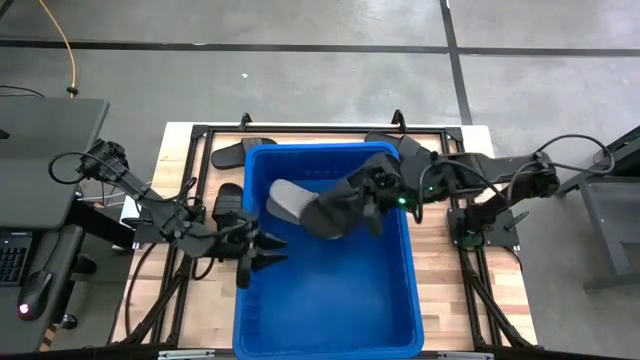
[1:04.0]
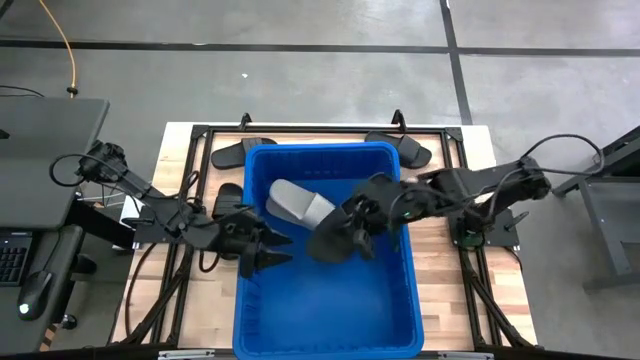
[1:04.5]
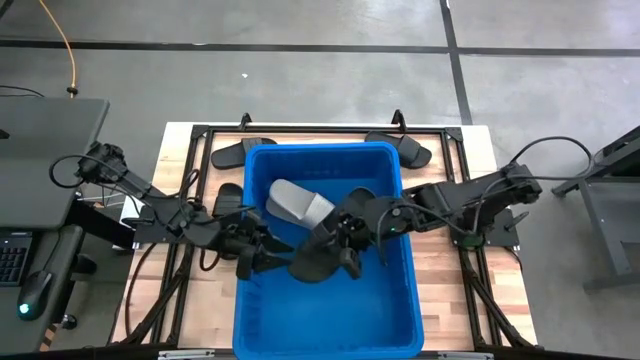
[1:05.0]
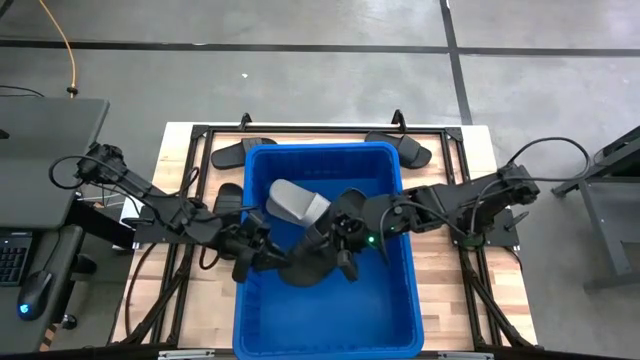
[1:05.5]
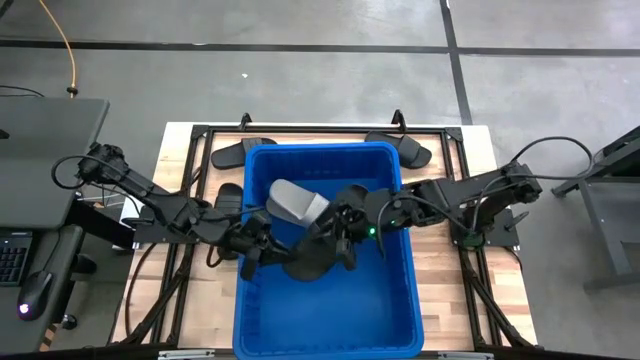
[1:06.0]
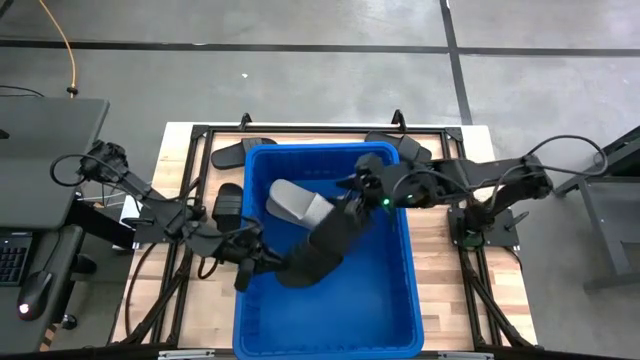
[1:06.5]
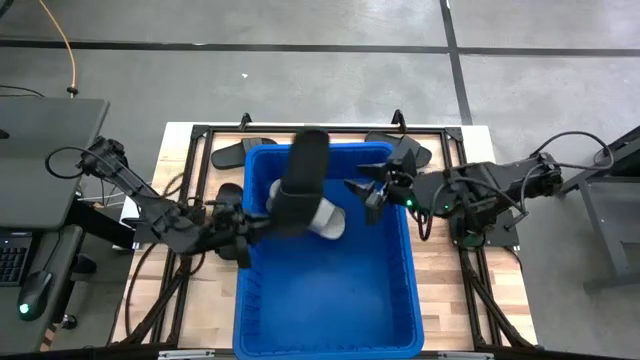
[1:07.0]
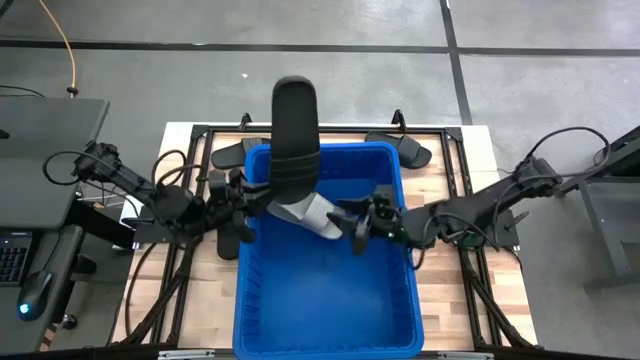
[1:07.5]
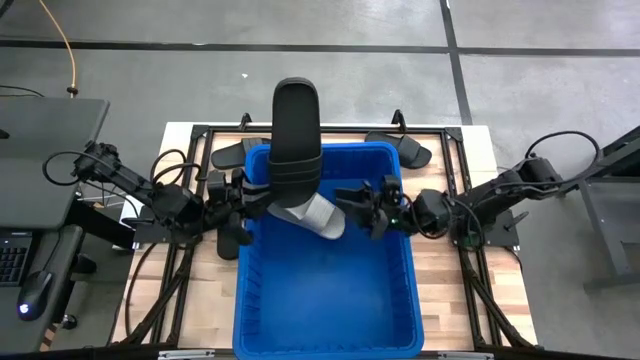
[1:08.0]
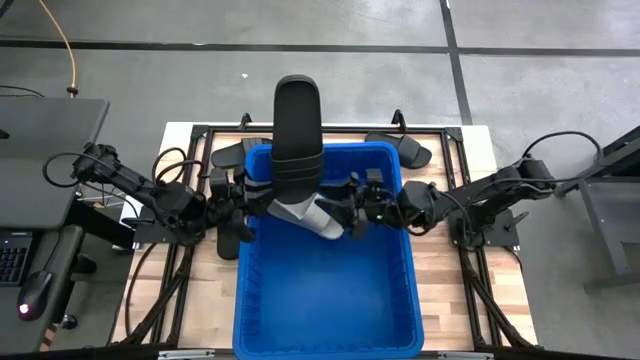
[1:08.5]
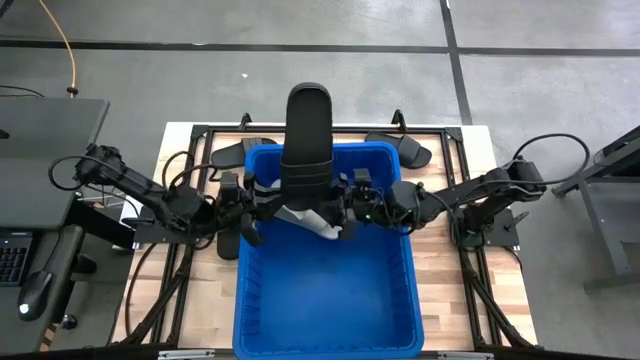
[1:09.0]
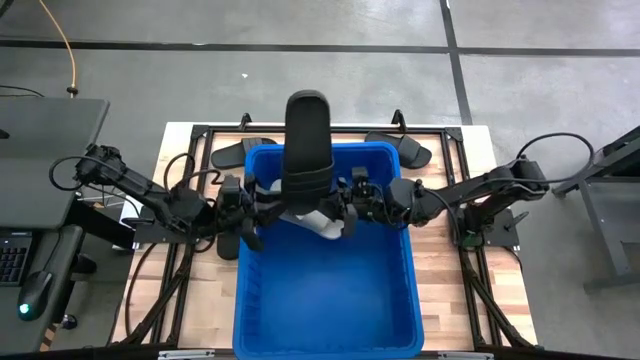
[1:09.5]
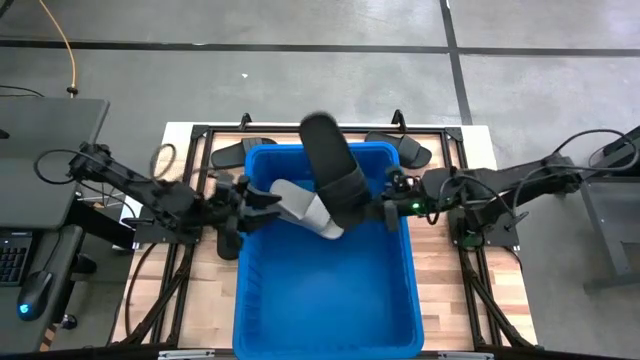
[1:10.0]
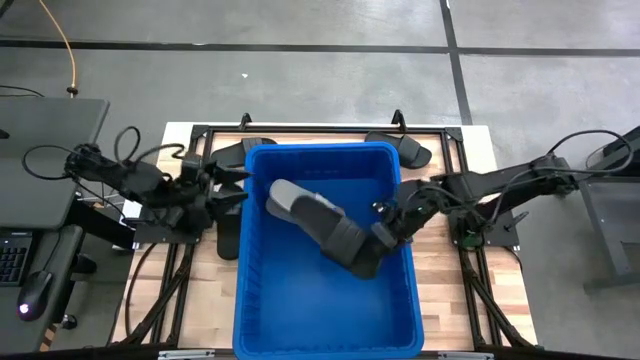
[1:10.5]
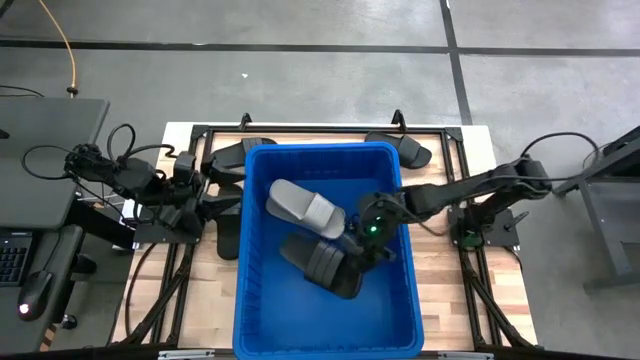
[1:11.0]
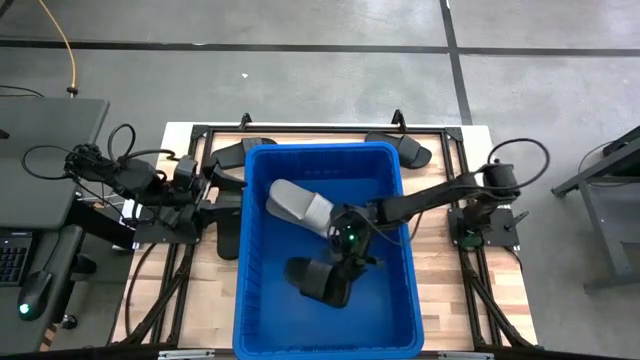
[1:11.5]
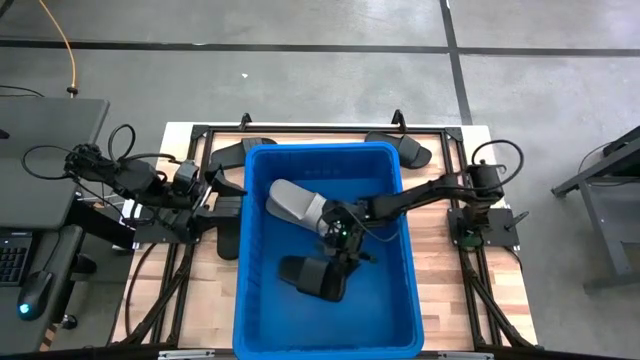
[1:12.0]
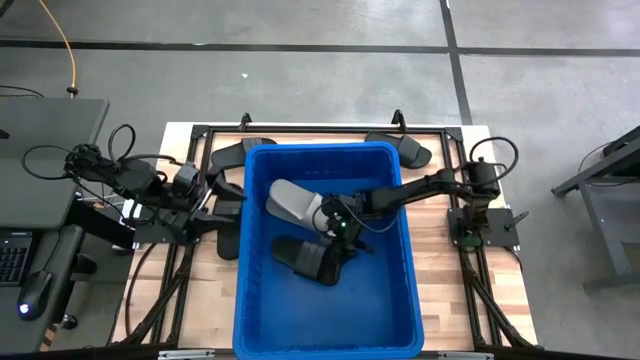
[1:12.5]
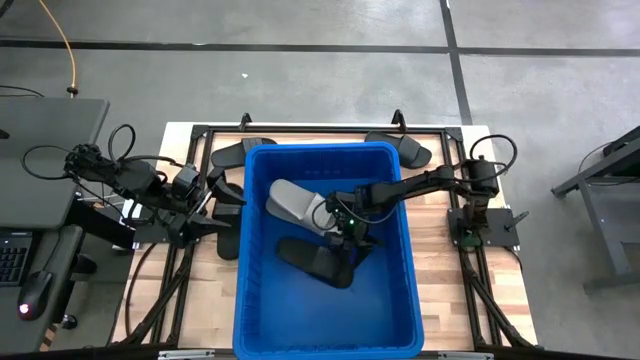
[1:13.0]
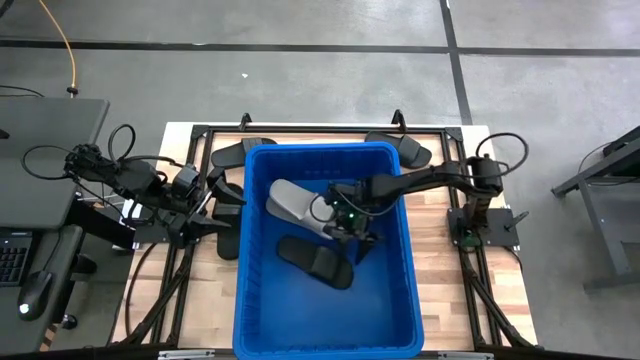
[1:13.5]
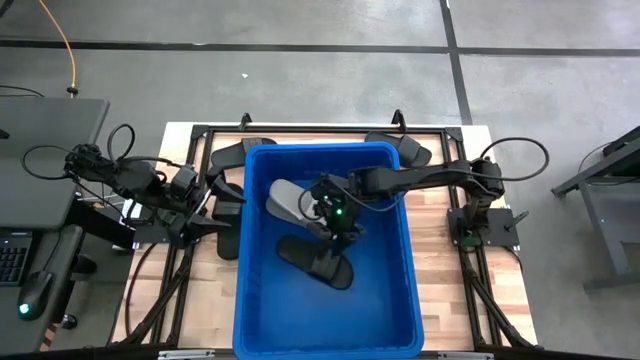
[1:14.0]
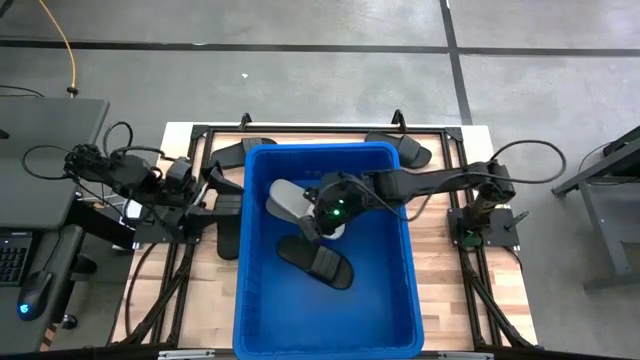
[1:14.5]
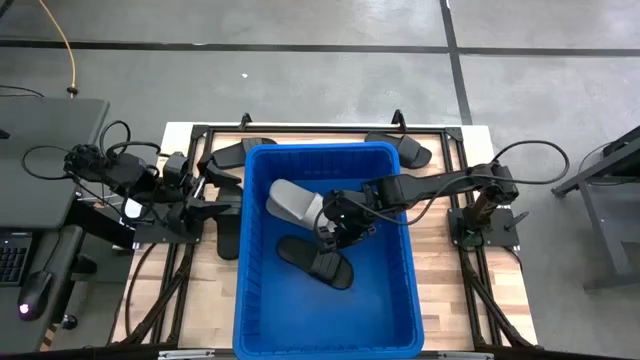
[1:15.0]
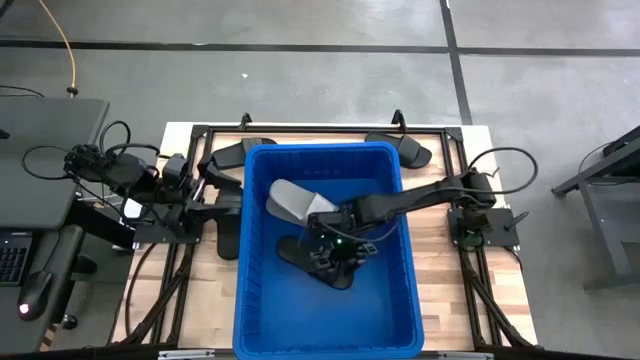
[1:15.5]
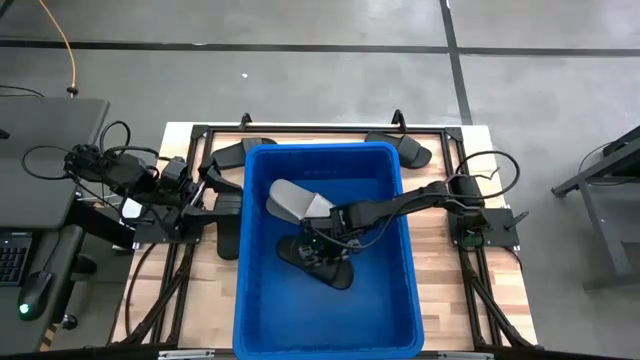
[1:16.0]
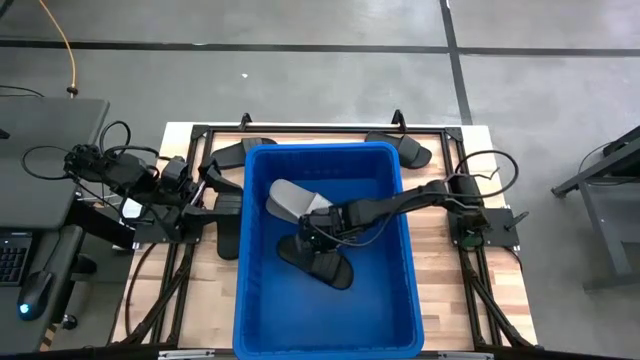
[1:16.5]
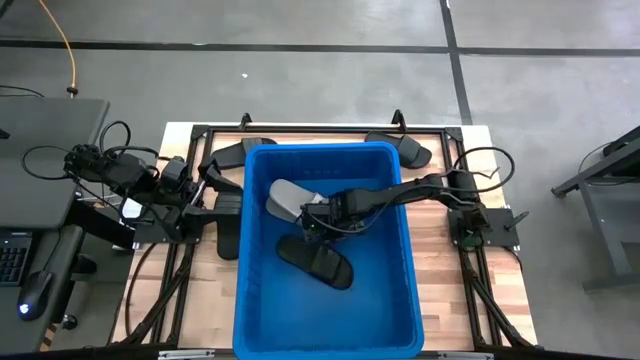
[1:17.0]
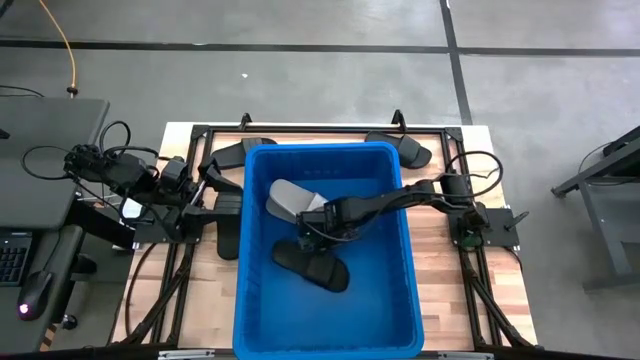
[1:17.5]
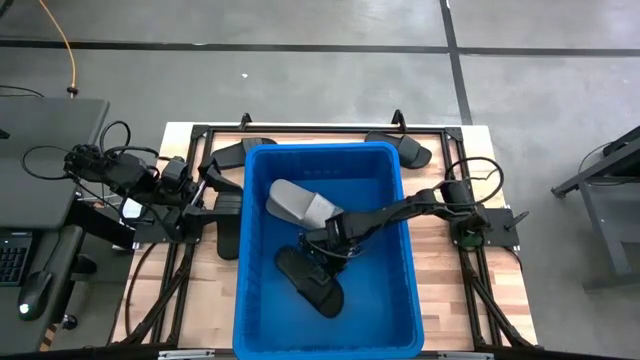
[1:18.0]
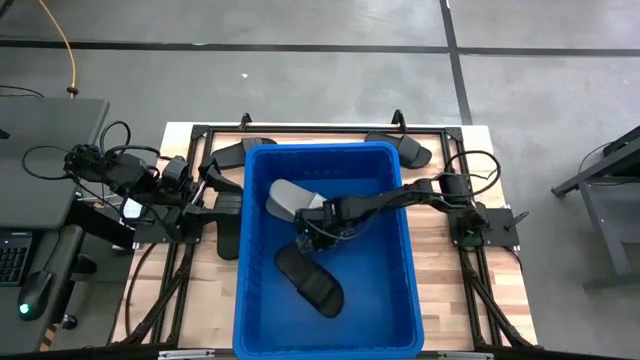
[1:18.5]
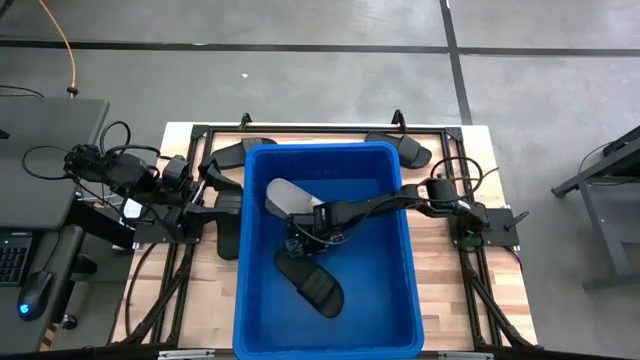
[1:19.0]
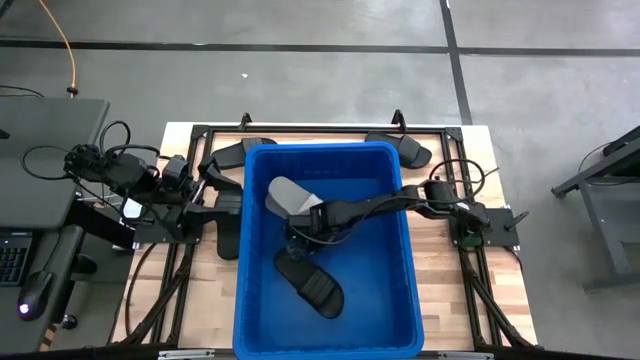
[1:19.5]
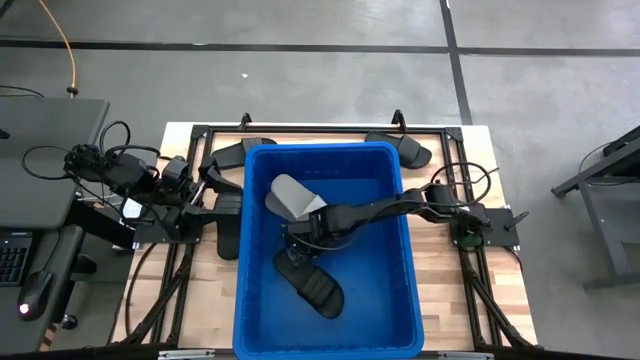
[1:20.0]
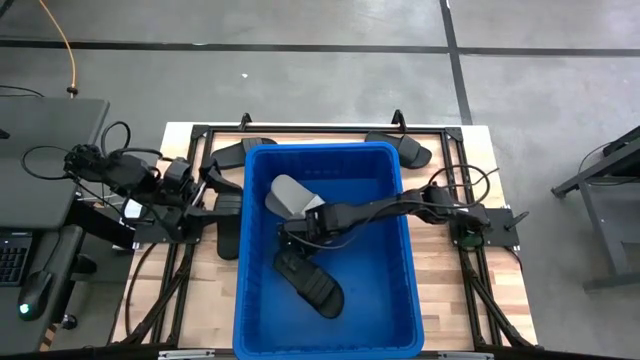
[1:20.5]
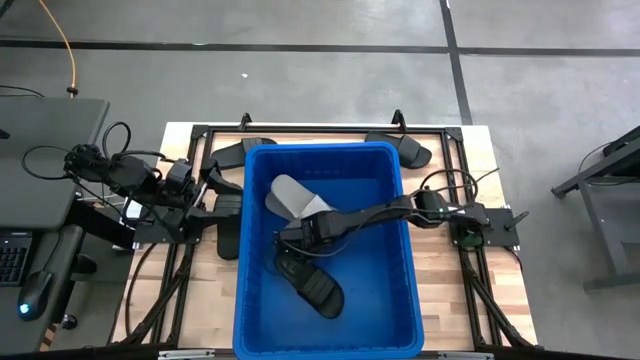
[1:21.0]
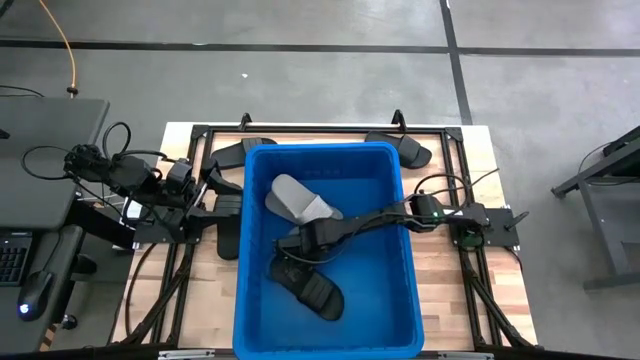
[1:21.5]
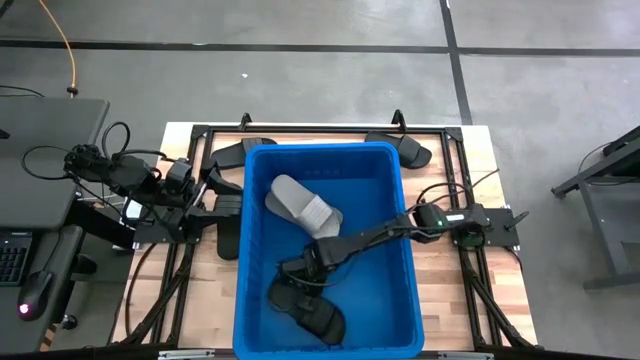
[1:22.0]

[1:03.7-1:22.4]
Task: Pick and place slides into bin
Put the bottom right black slipper into the blue bin

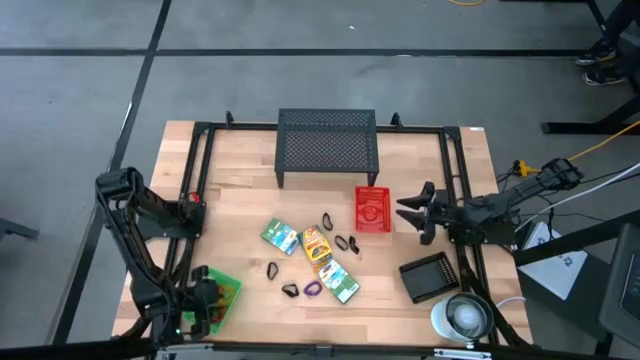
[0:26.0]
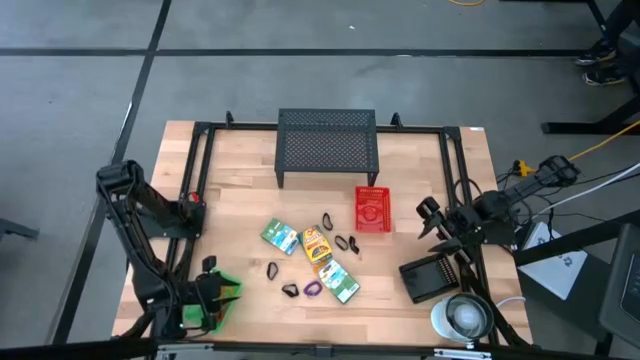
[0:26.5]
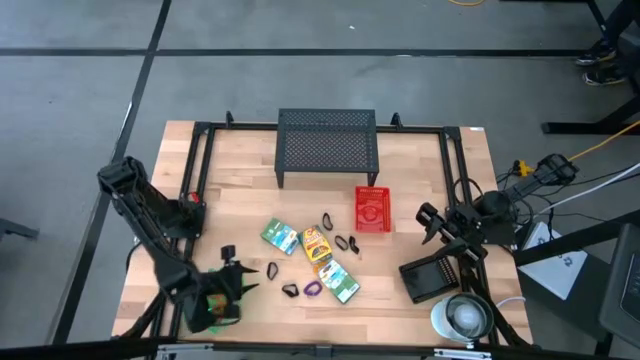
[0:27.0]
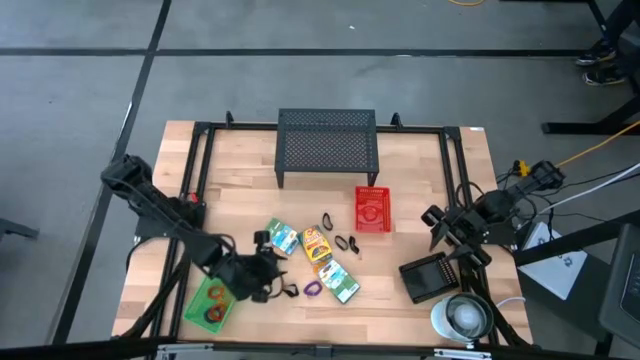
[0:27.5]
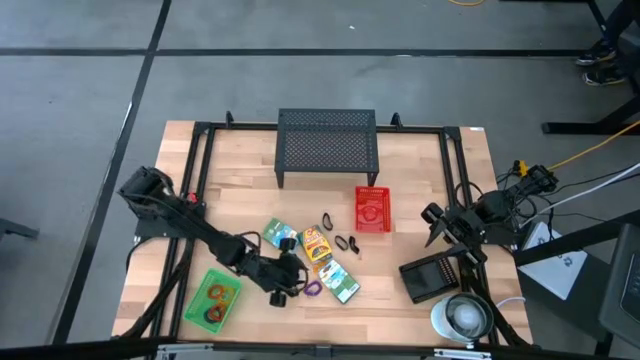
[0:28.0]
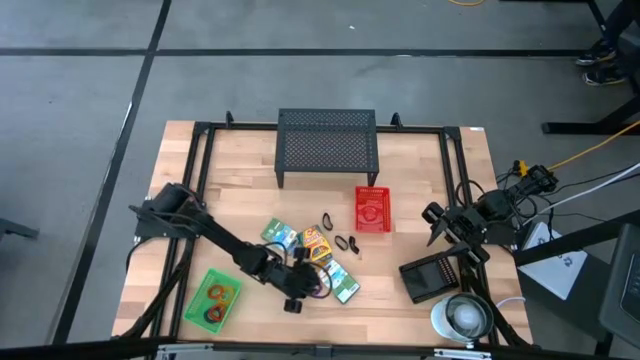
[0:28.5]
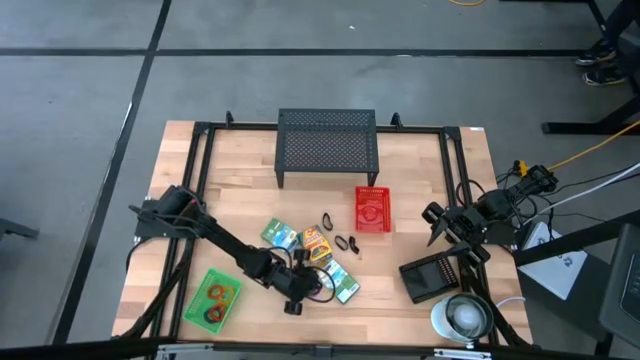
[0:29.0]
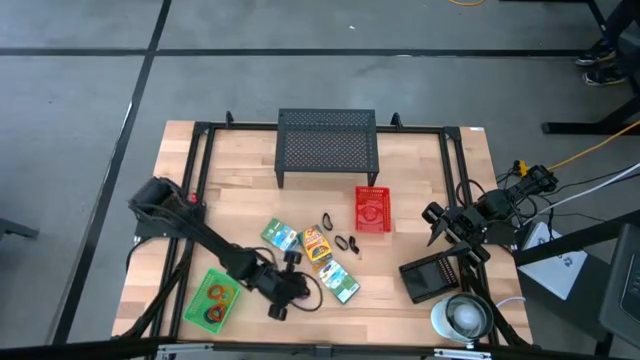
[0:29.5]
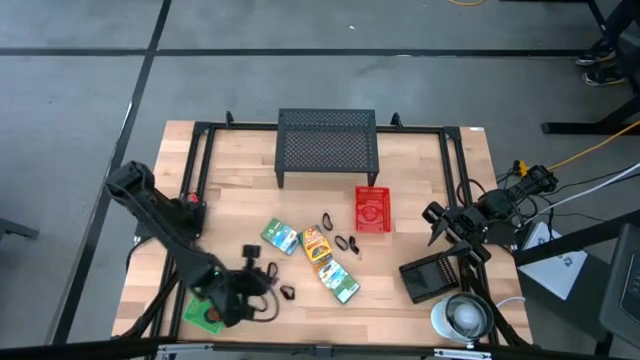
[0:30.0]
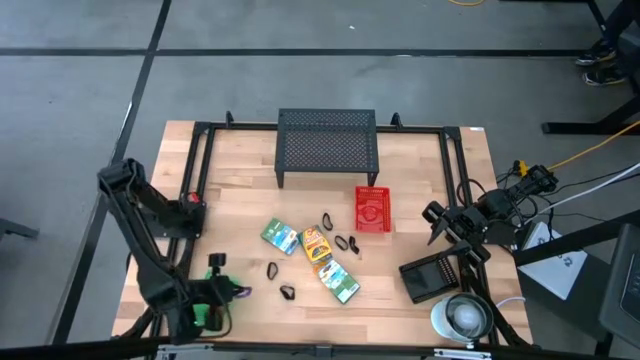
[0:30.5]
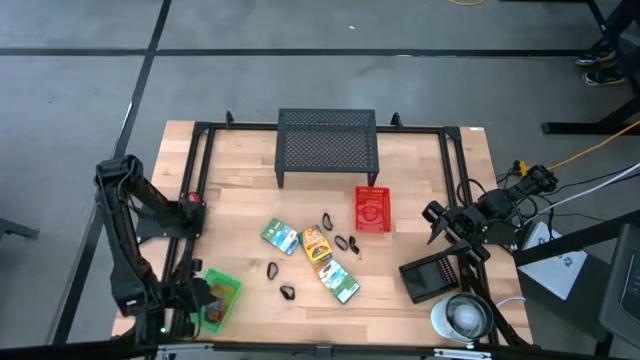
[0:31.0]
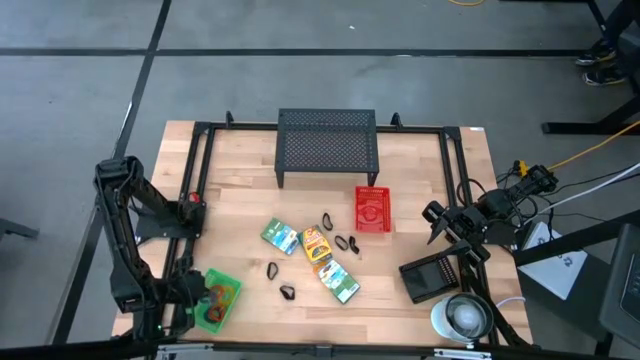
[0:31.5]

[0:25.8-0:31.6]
Task: Pick & Place Office Desk Supplies
Put the violet spring keychain into the green bin
